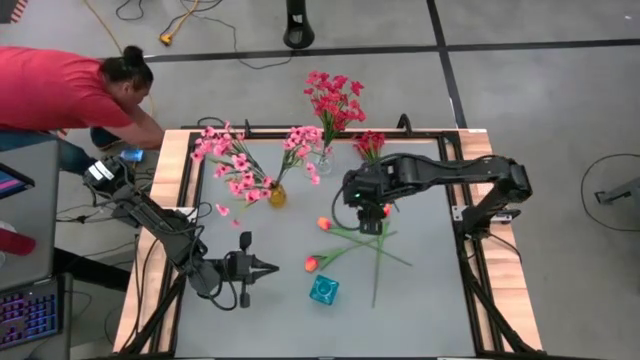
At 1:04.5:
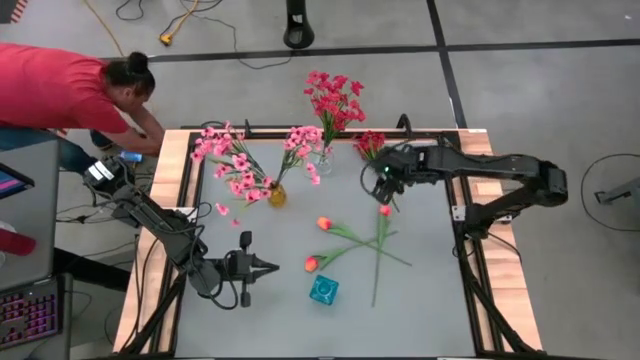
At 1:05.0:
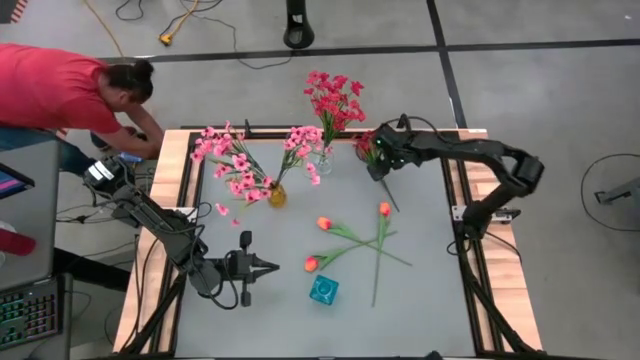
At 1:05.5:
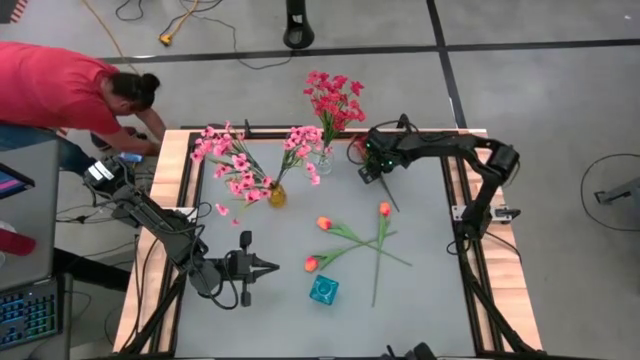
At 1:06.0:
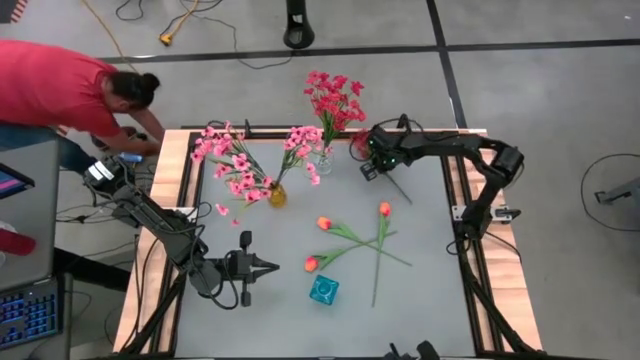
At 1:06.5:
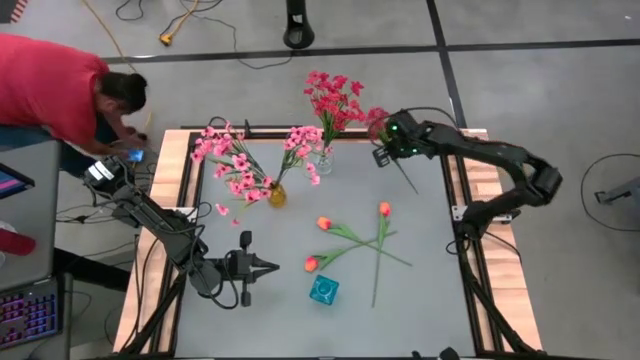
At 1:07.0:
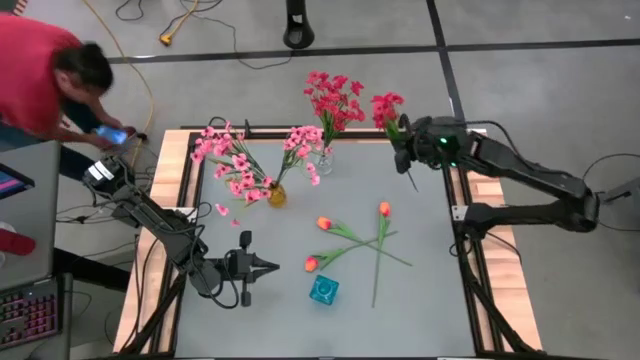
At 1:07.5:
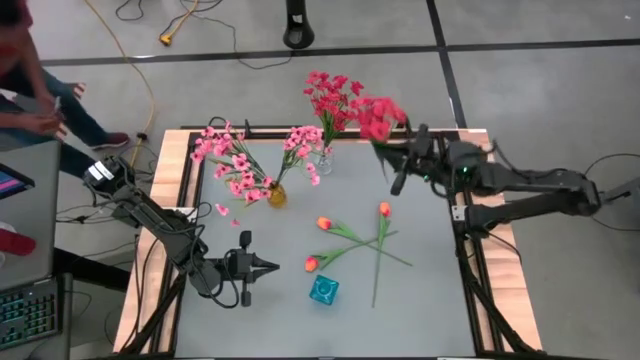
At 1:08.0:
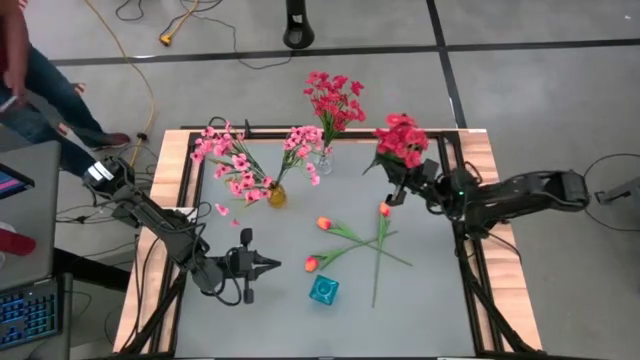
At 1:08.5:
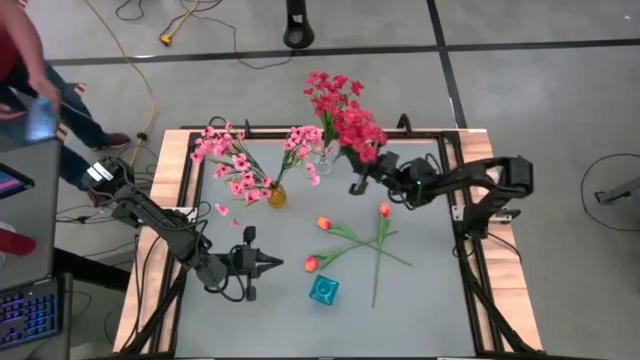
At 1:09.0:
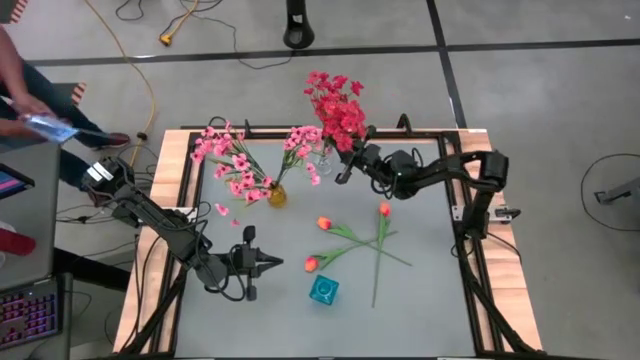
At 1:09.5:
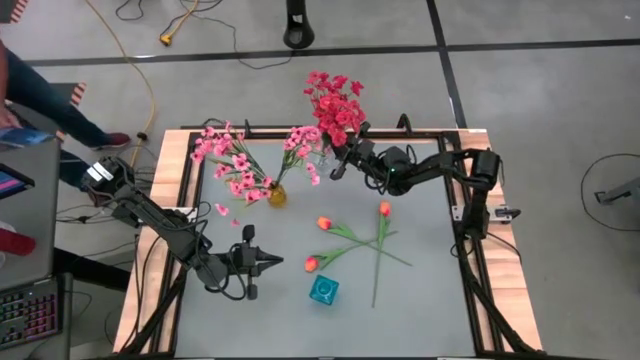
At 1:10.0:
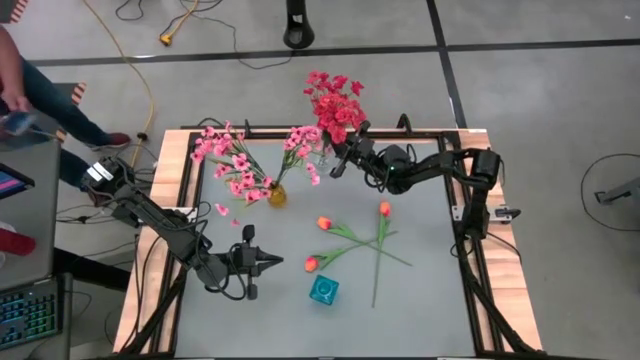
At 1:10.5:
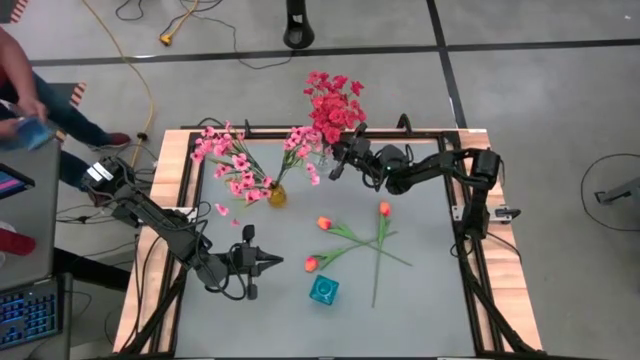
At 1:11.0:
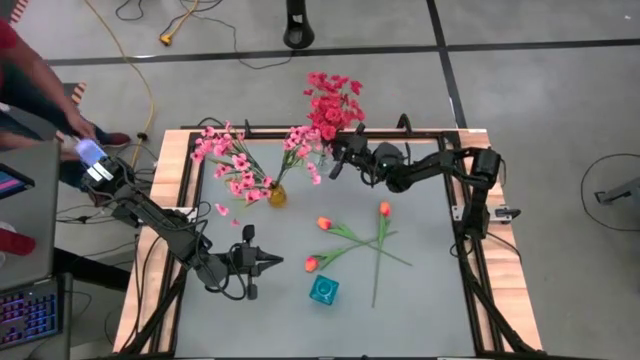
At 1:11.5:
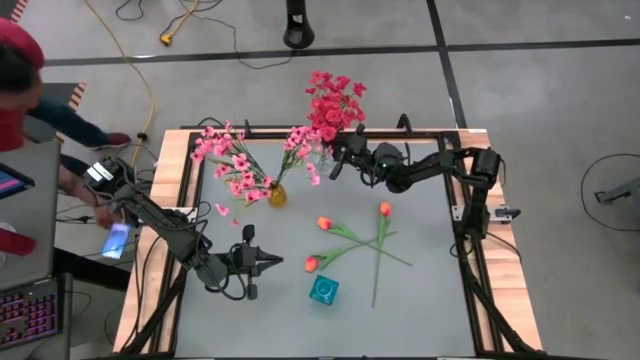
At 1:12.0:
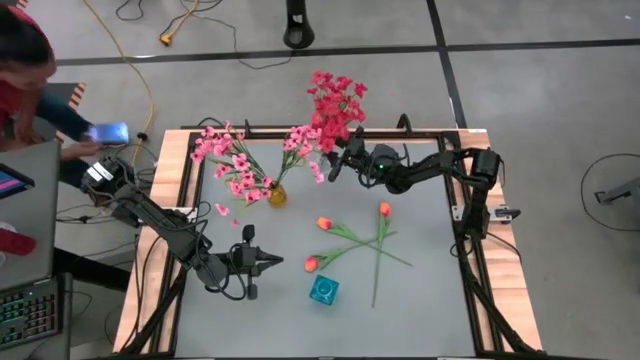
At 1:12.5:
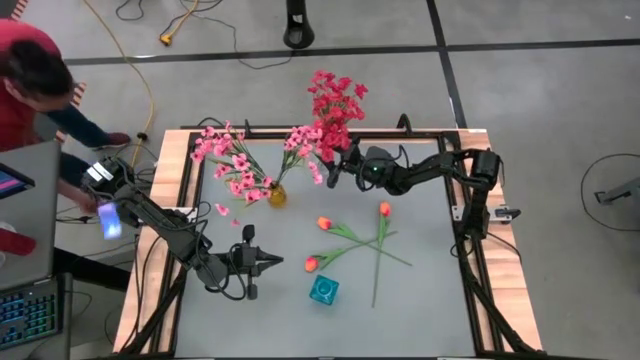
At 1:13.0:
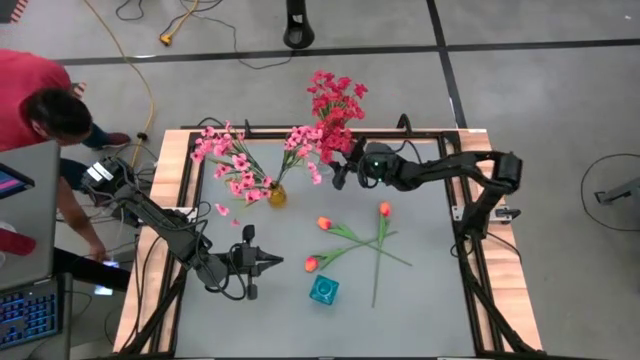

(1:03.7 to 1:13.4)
Task: Sort flowers into vase by color
Put the red flowers into the transparent vase

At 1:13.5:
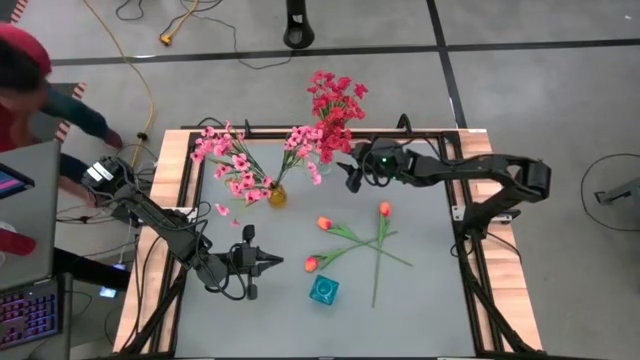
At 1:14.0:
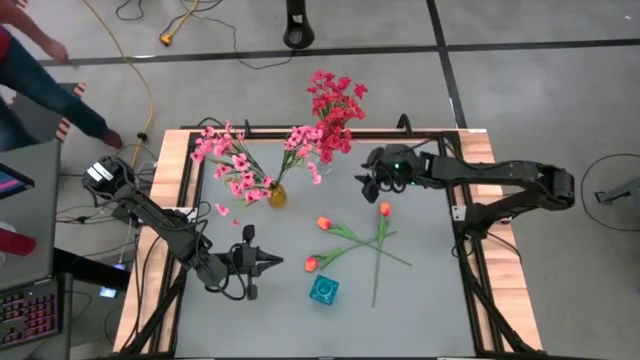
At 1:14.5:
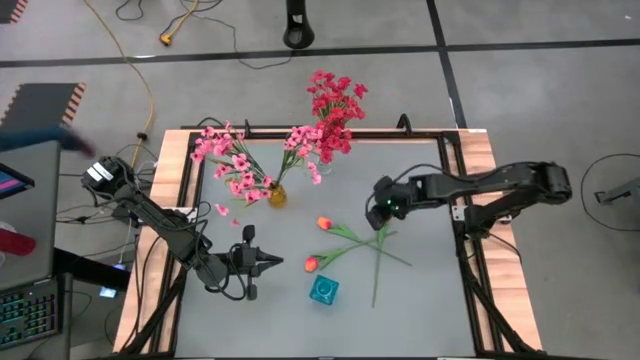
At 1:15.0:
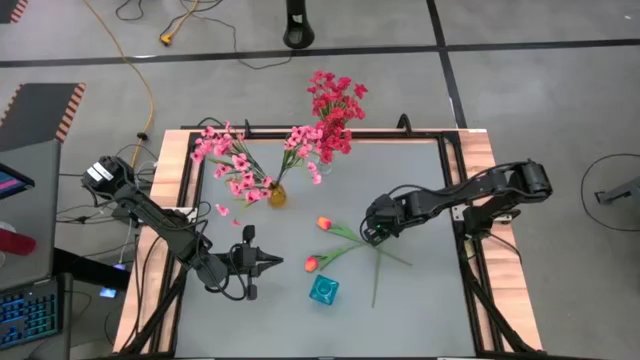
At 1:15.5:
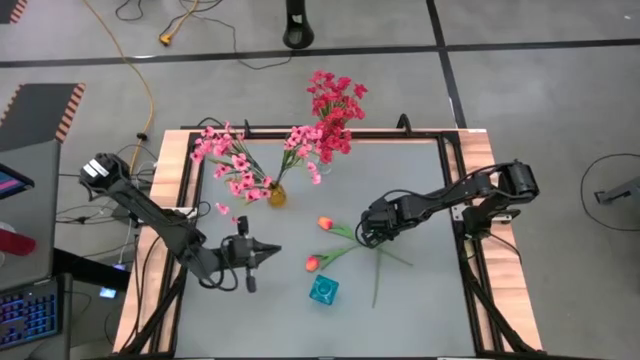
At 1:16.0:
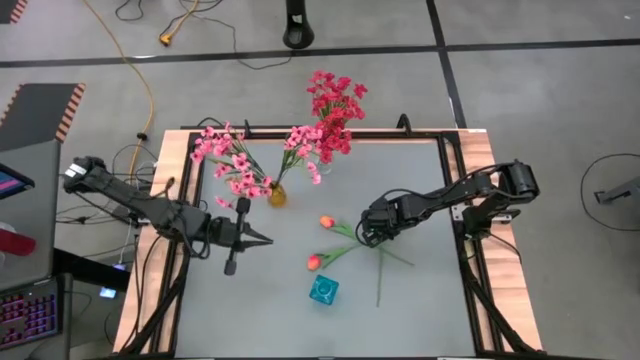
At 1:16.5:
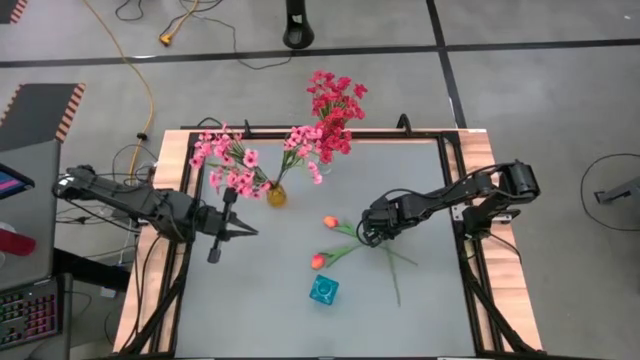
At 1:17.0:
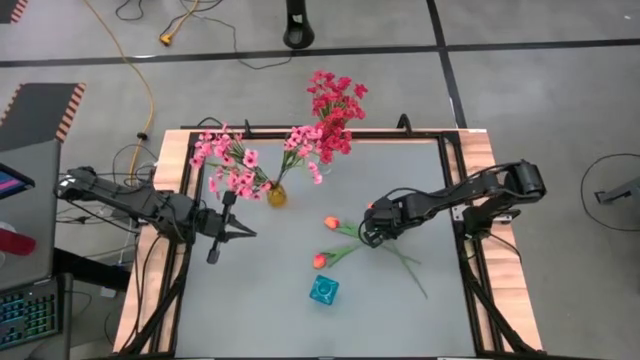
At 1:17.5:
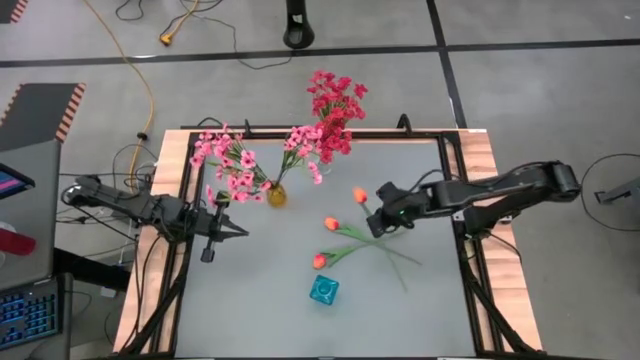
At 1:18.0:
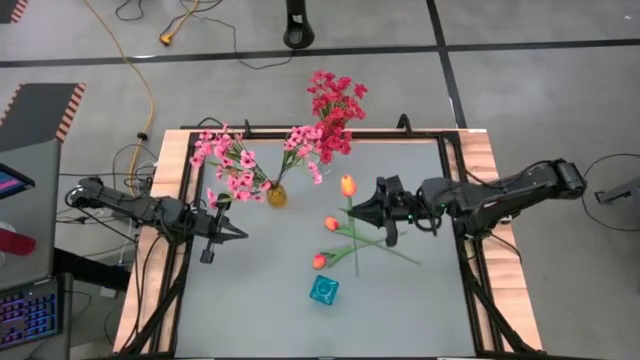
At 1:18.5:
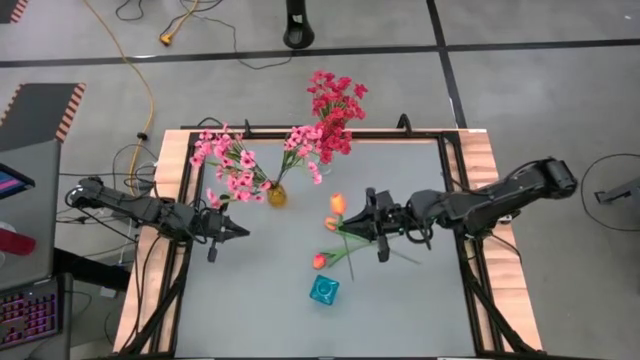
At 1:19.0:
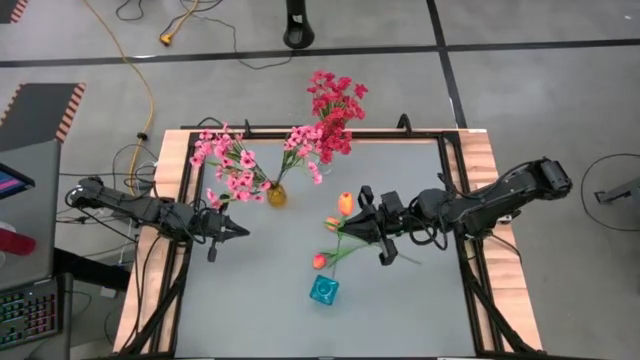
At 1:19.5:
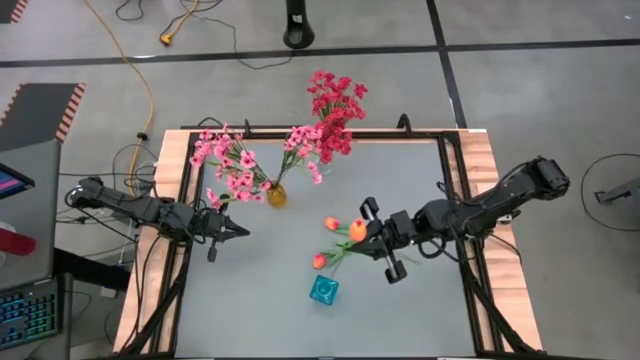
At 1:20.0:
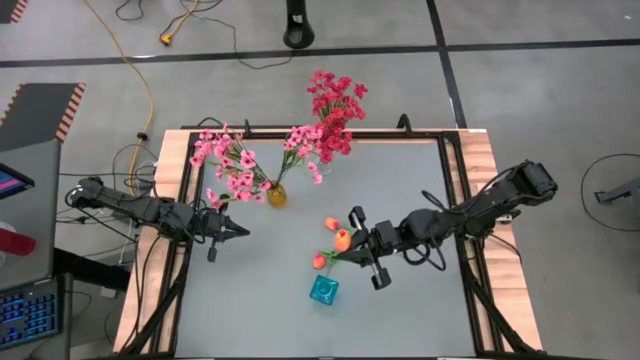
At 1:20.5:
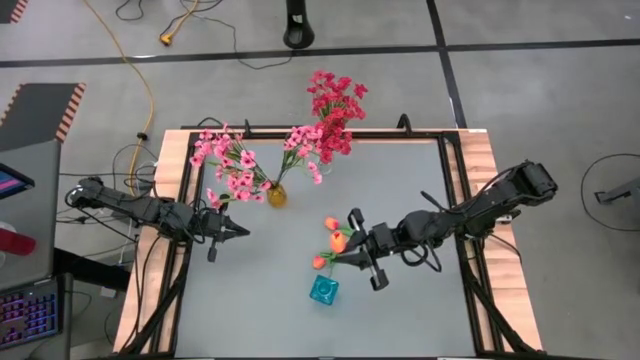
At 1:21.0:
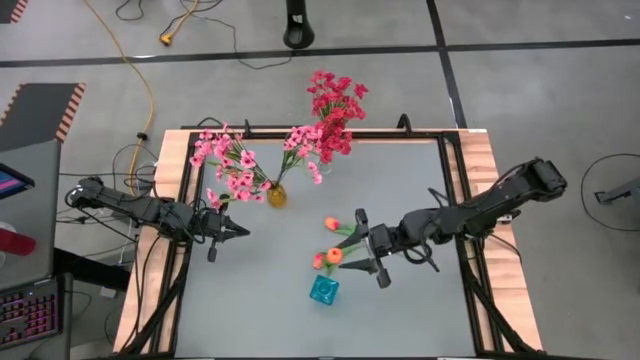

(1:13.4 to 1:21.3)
Put the right orange tulip into the blue vase

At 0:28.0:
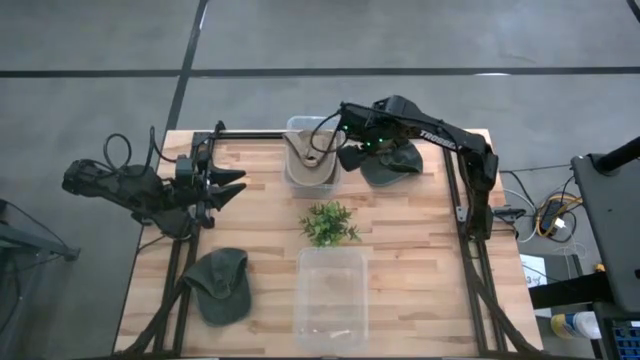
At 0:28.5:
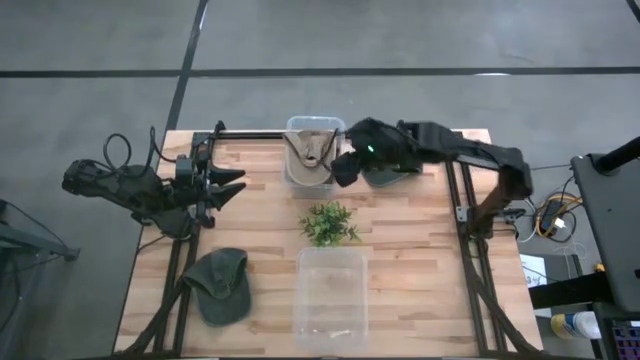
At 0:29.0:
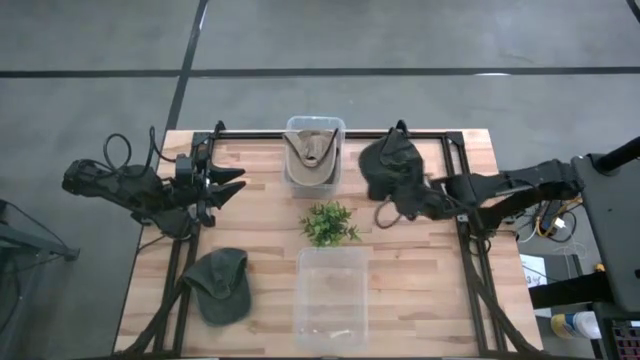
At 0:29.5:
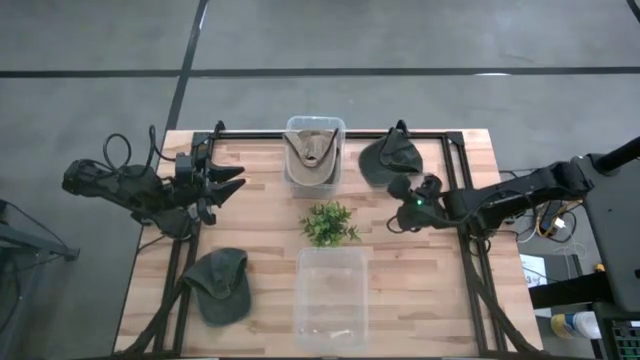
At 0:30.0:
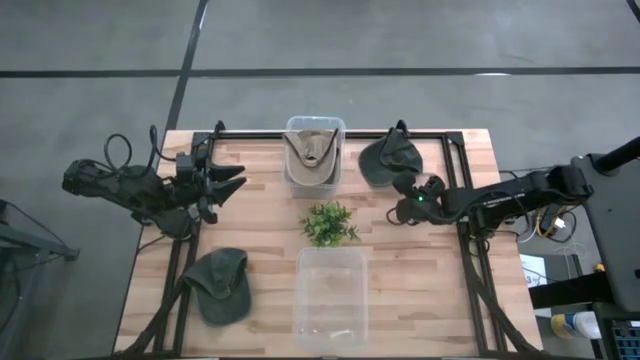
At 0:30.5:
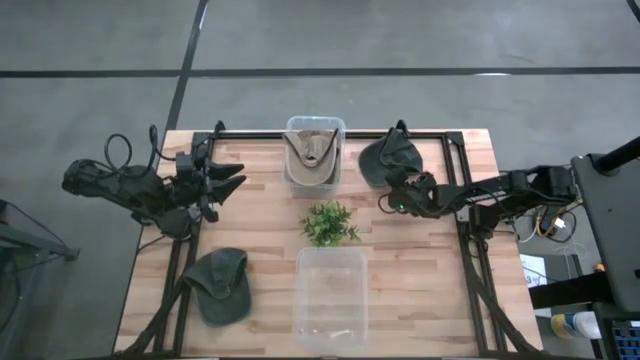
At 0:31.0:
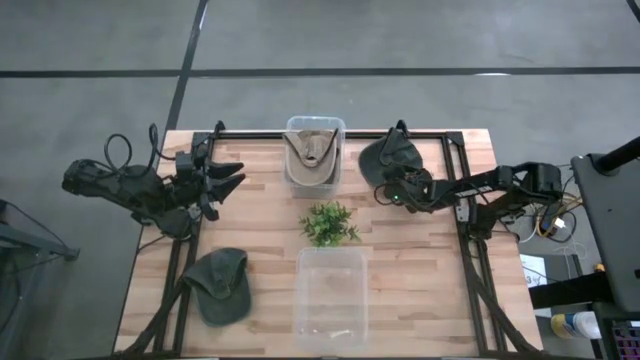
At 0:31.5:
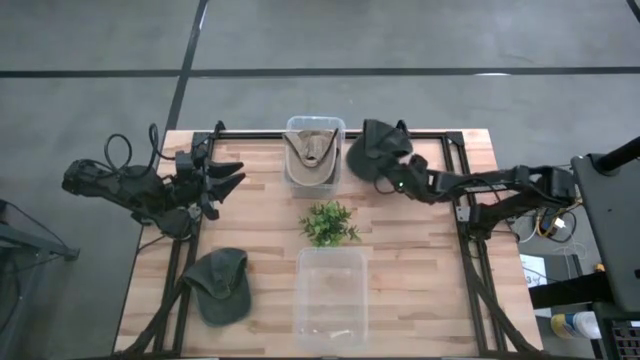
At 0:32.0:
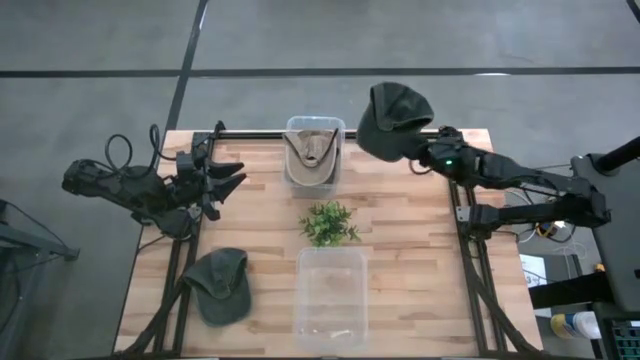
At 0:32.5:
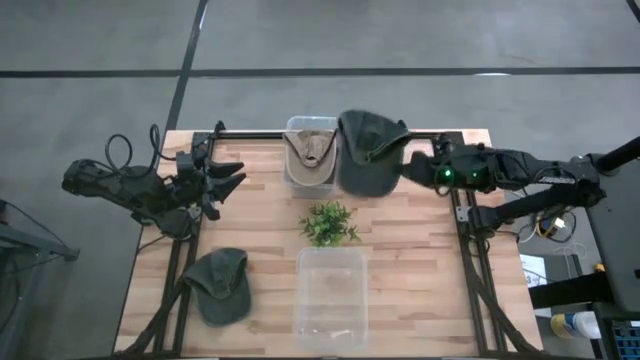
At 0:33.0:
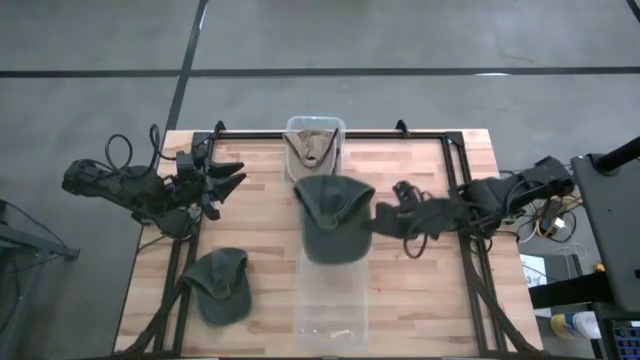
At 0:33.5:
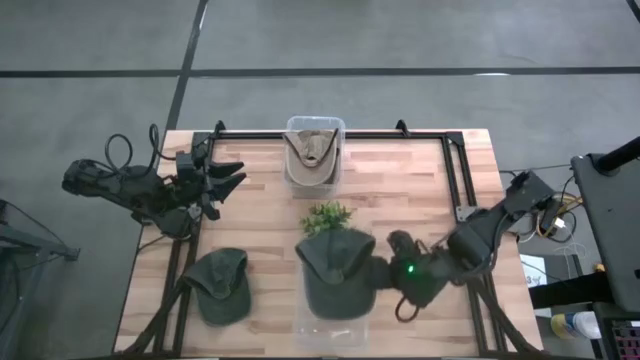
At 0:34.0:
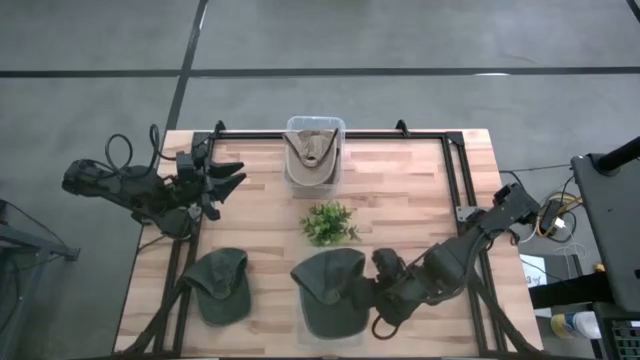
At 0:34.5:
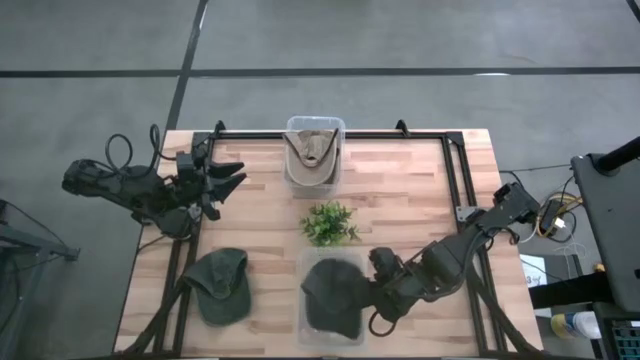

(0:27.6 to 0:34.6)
Task: Pick & Place hat
Put the top black cap into the bottom transparent bin
